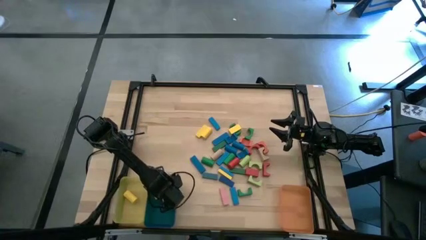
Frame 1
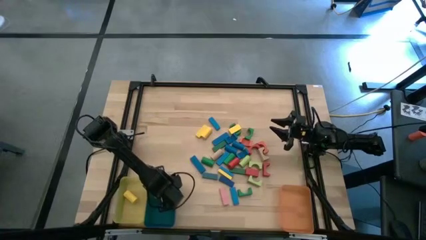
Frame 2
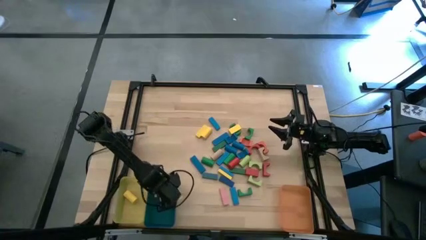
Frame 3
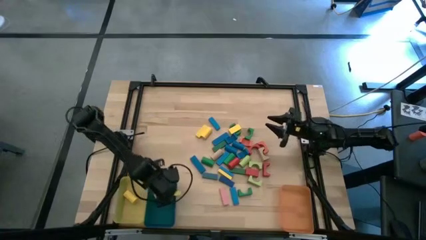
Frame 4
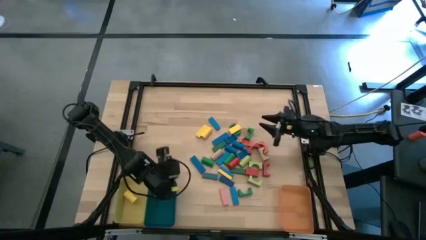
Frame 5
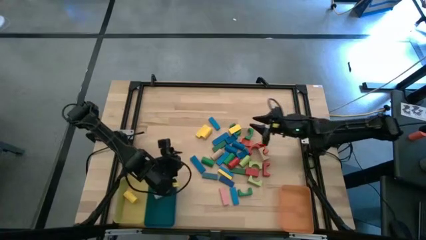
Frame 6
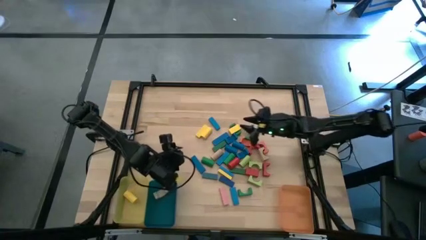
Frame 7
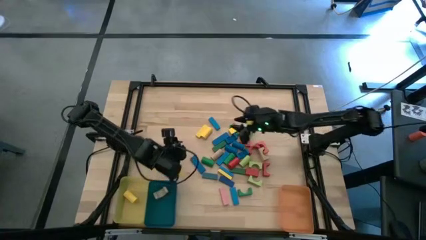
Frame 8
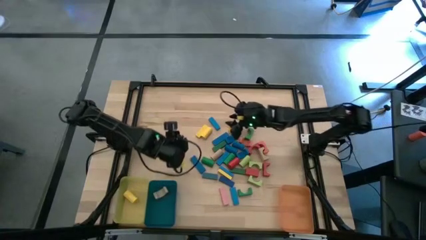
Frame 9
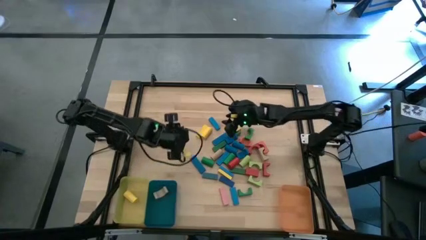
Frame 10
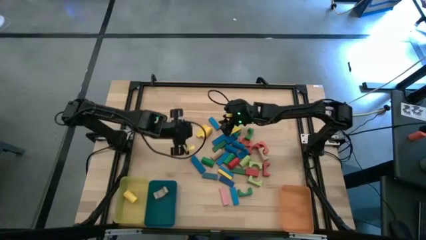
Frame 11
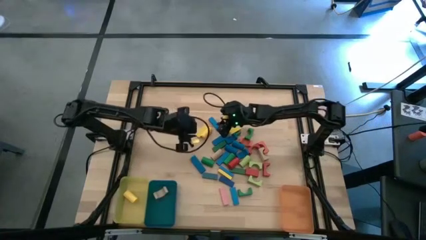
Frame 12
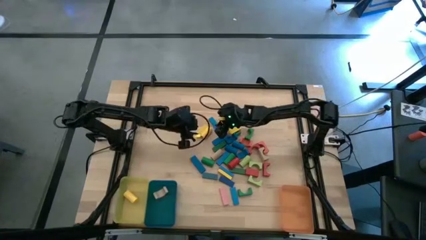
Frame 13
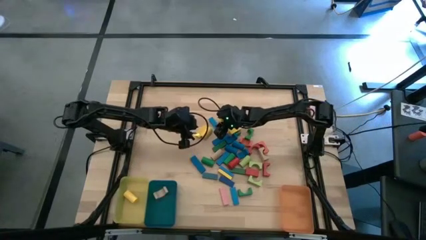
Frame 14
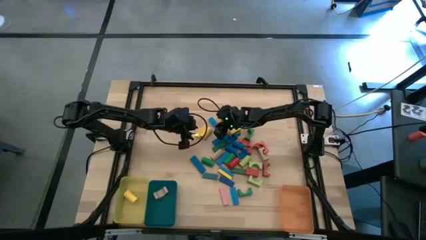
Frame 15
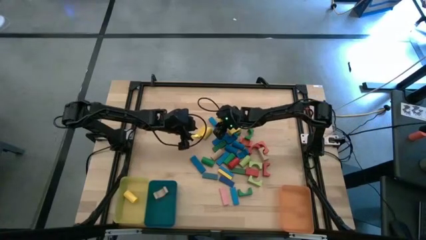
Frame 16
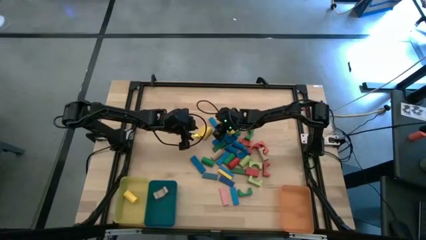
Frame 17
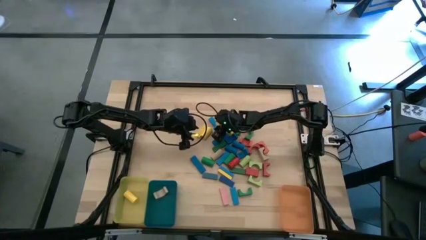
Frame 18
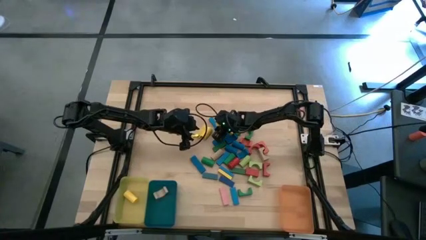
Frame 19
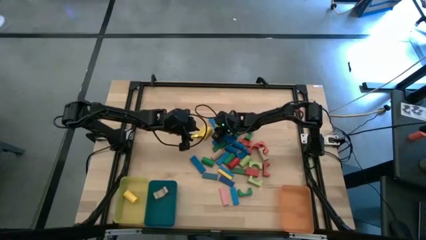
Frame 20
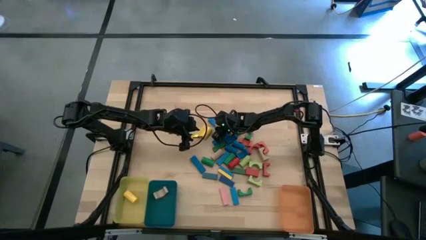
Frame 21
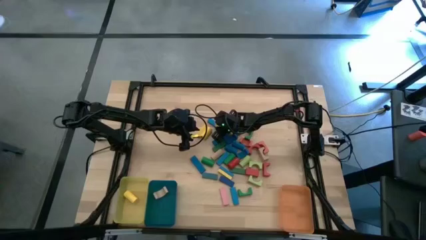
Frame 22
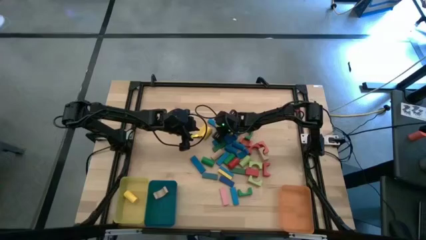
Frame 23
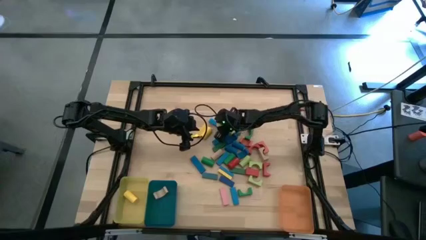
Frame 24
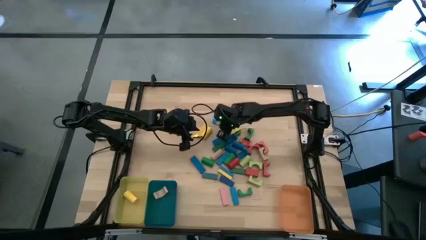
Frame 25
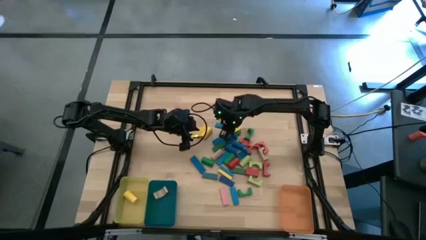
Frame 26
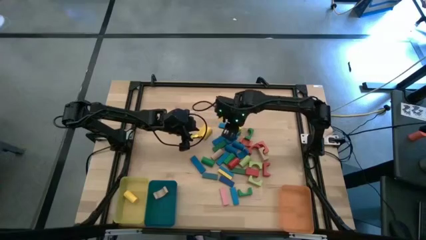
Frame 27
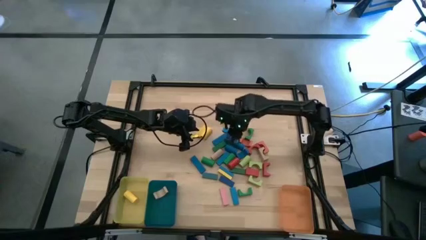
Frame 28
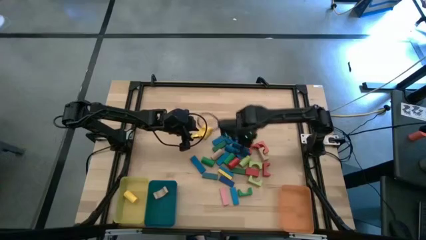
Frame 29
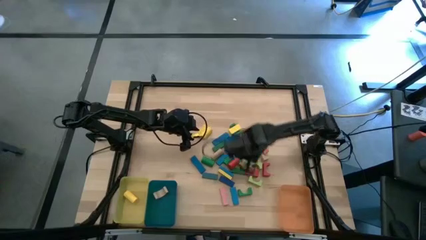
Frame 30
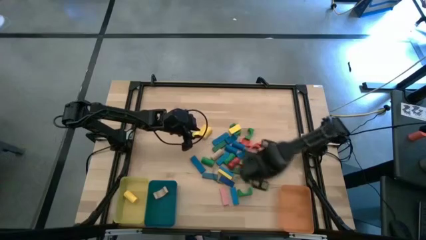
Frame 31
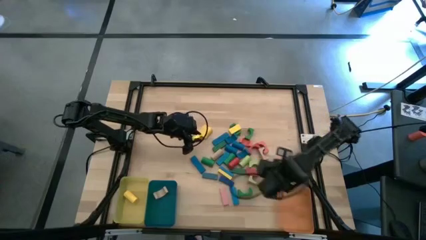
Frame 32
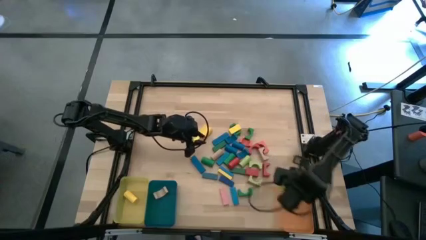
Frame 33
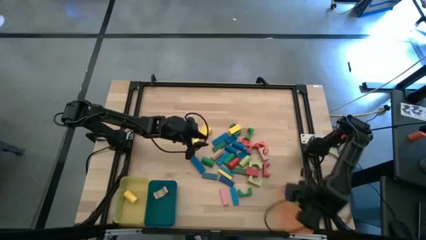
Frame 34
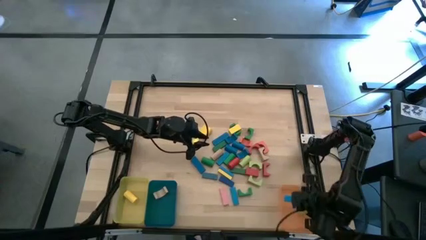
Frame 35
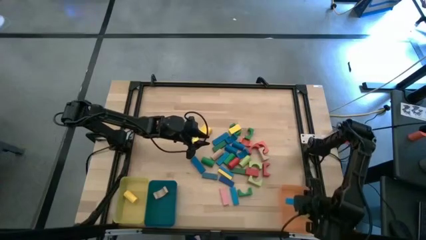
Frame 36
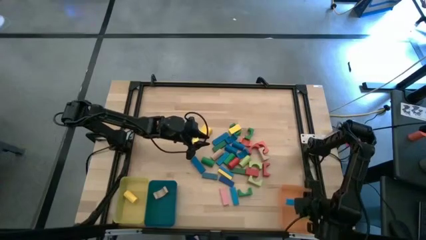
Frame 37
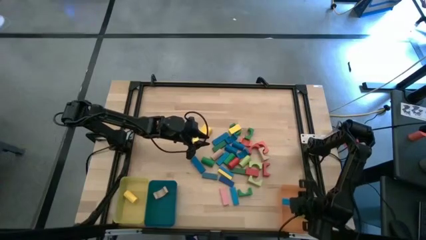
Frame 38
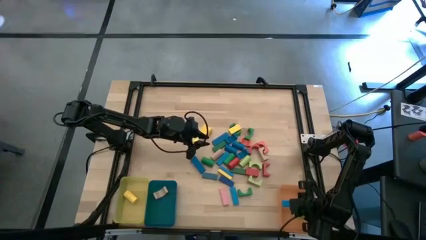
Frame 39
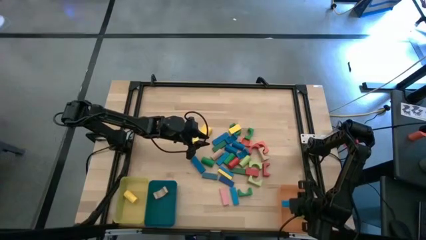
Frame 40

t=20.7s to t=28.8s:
Task: Sort blocks by size
Put the blue rectangular block into the orange bin

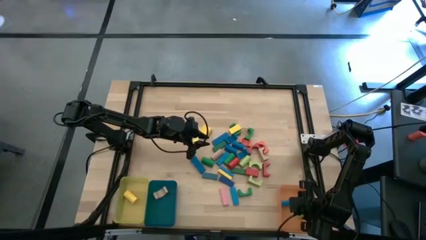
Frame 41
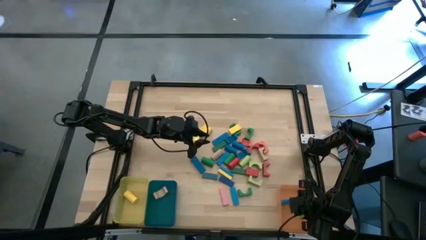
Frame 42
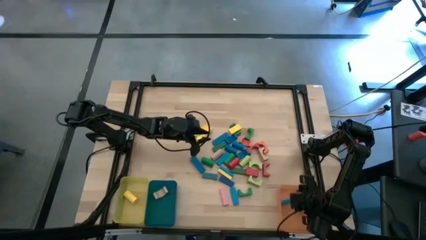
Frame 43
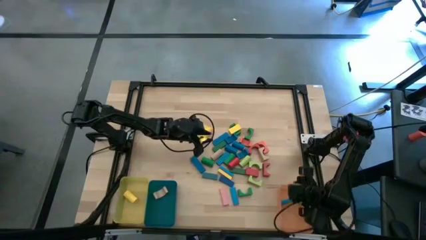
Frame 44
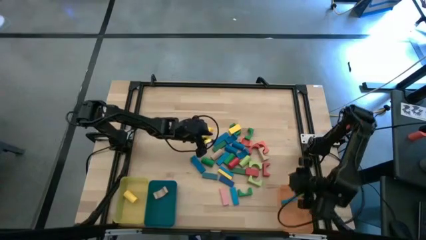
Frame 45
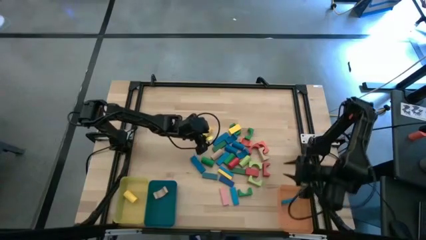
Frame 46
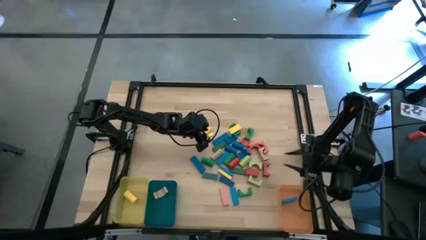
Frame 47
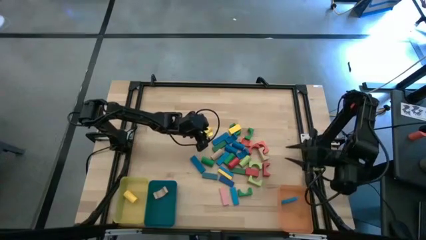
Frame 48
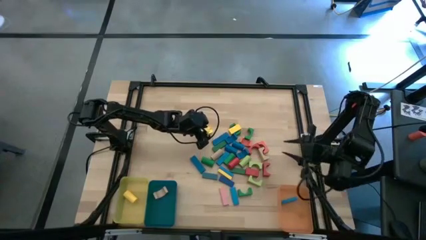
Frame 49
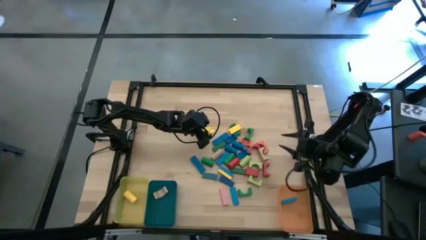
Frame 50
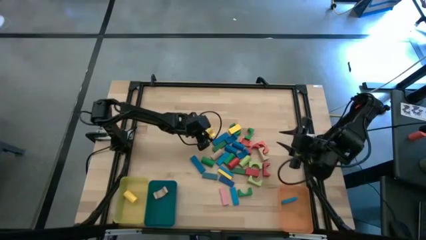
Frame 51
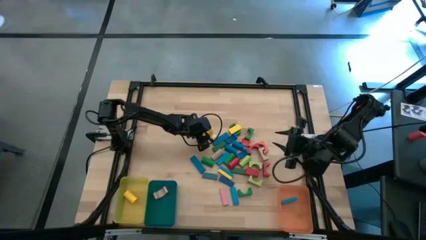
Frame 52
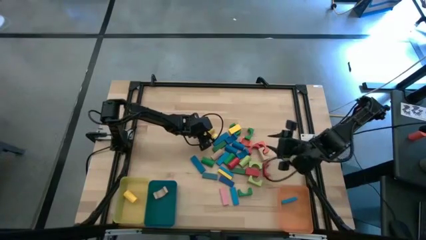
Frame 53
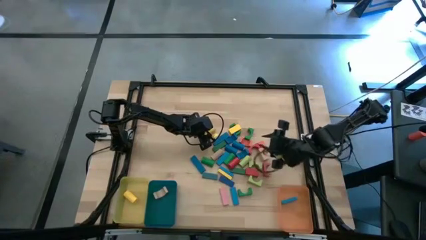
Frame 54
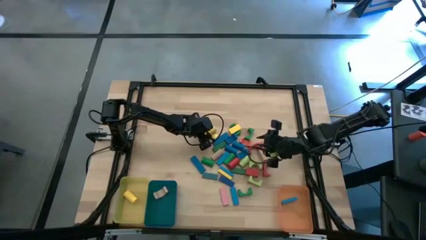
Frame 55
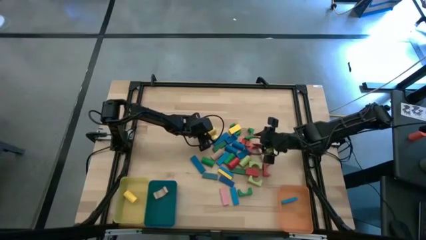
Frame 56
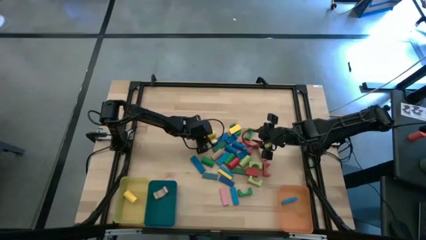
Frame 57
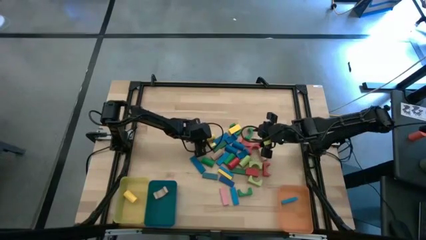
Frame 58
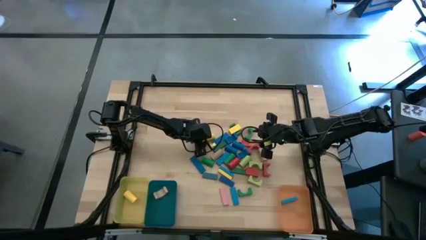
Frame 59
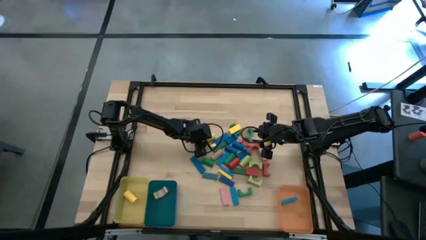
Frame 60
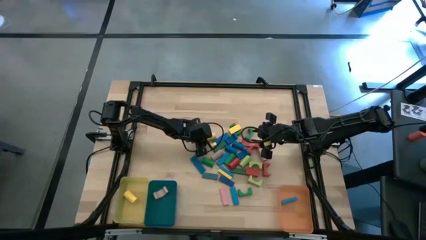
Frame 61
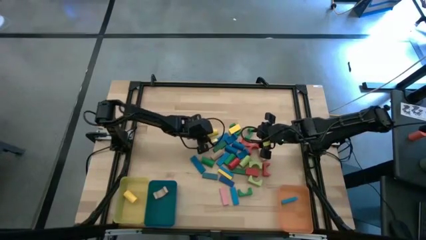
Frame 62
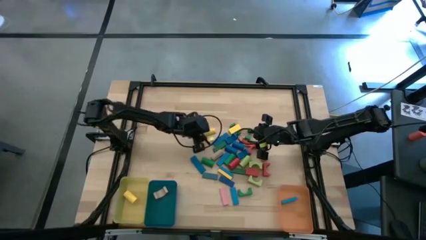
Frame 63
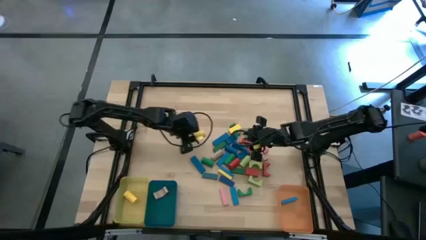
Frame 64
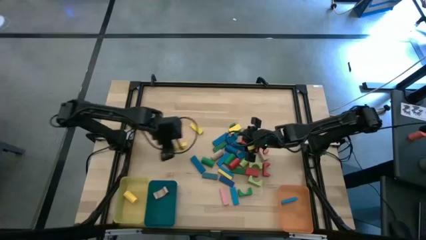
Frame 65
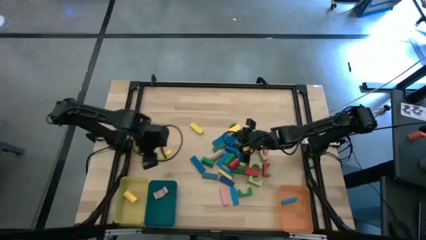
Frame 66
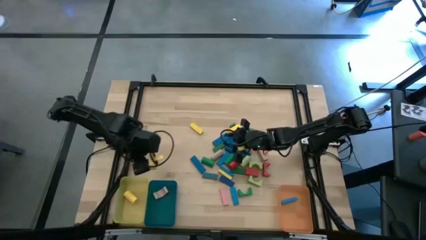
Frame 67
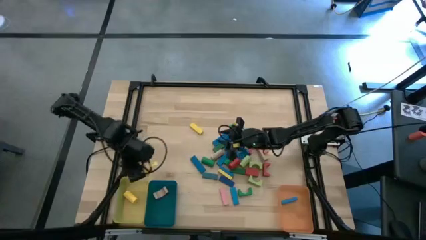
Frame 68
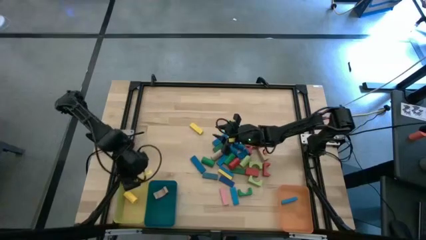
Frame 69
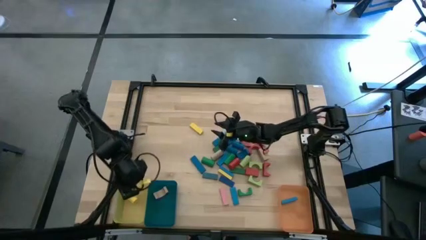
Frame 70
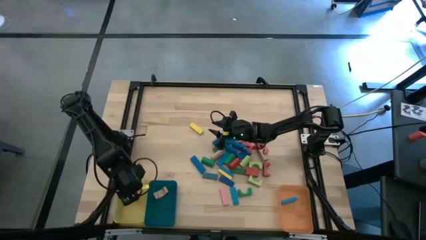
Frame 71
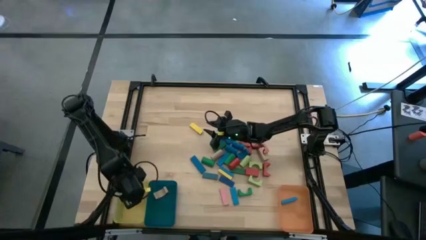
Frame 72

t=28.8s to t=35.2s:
Put the yellow cylindrical block into the yellow bin

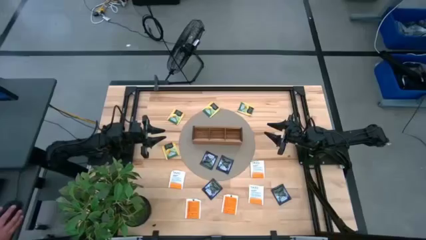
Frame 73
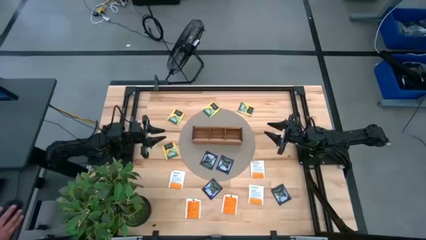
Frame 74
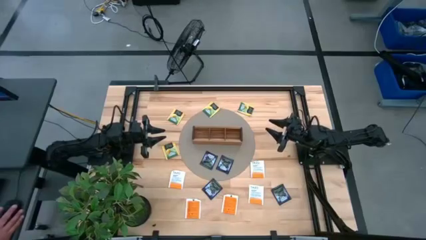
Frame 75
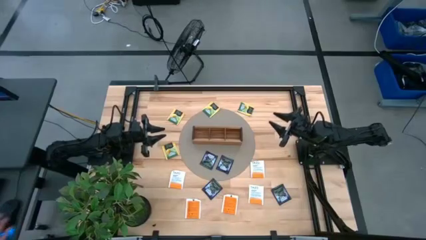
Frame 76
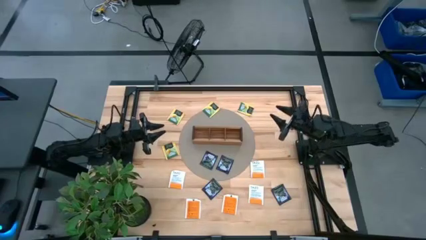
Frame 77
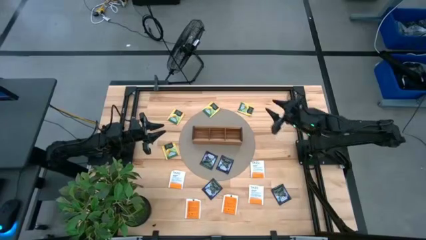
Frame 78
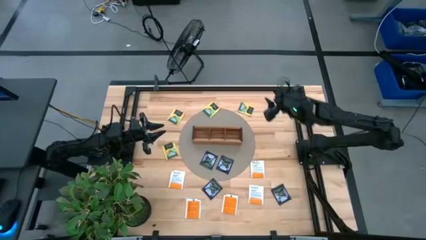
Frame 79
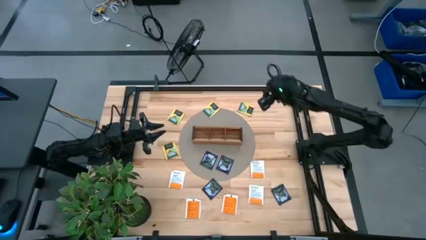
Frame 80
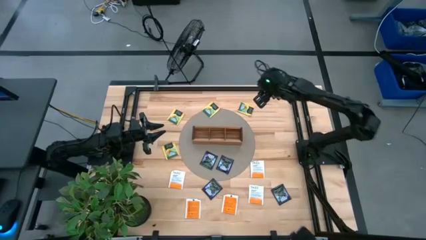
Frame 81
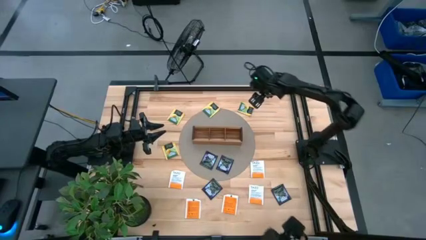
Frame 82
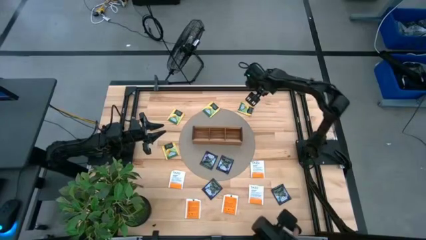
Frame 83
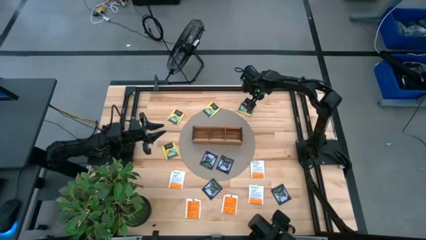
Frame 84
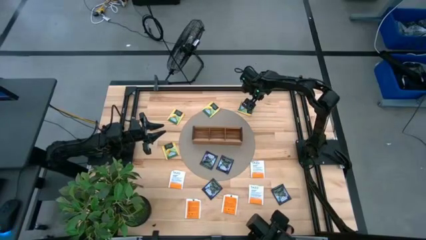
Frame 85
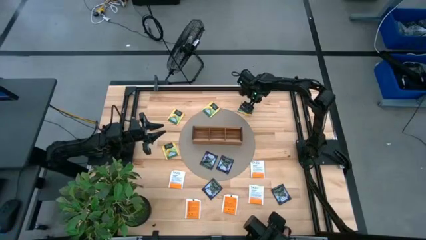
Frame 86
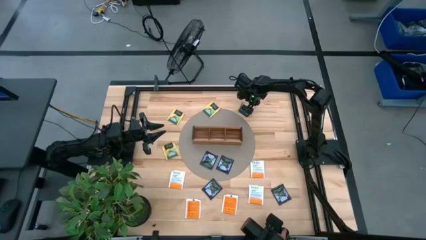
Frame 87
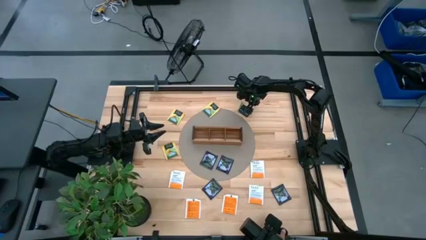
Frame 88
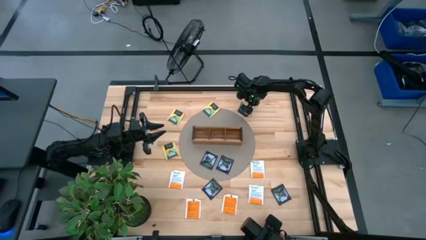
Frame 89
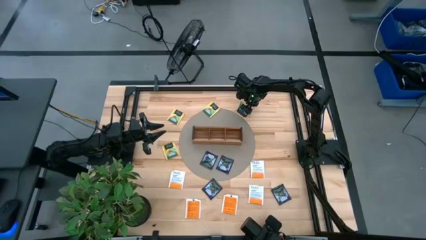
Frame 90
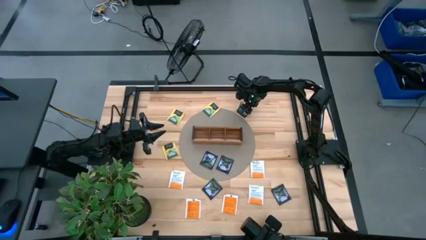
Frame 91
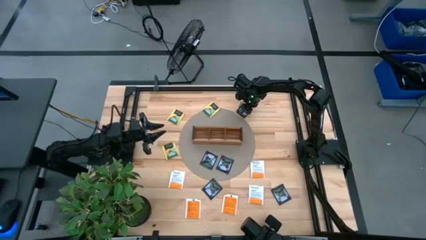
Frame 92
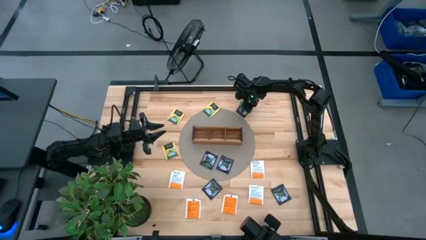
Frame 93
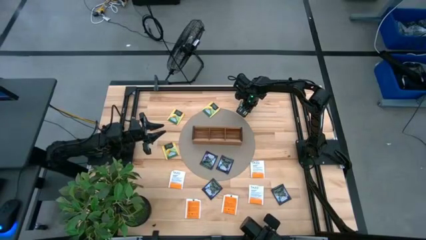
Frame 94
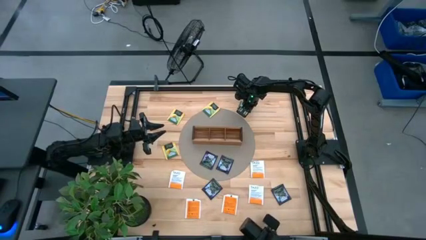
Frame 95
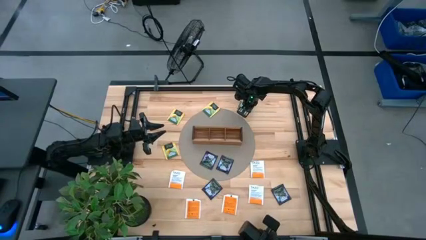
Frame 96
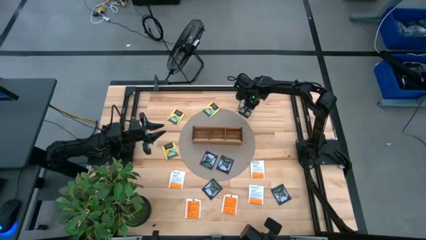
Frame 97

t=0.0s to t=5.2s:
Task: Pick & Place Tea
Put the yellow tea bag into the right section of the wooden organizer
